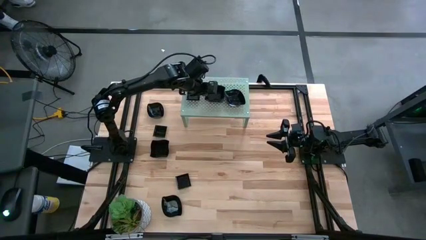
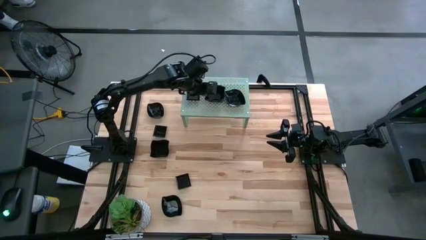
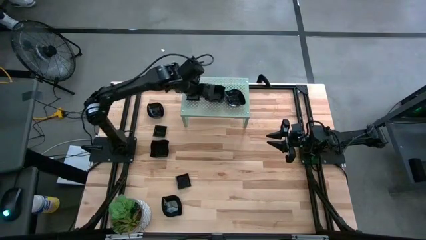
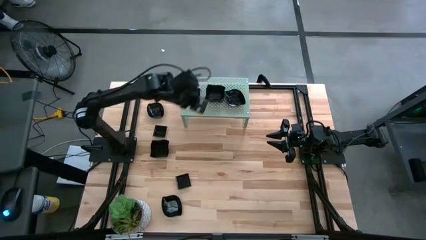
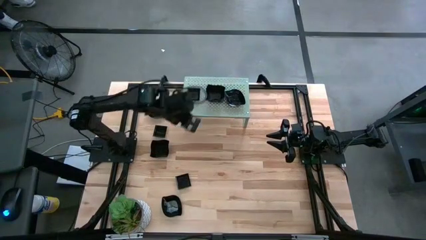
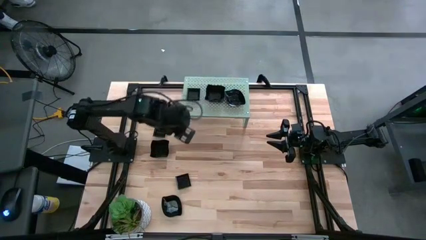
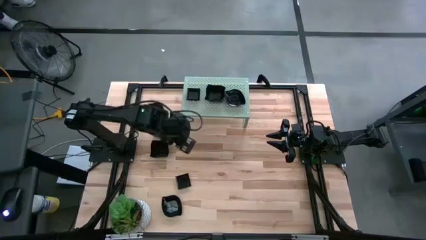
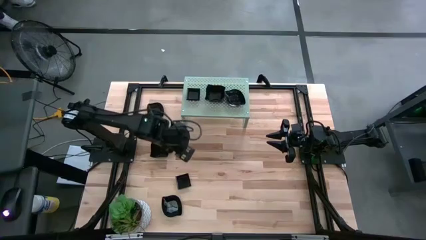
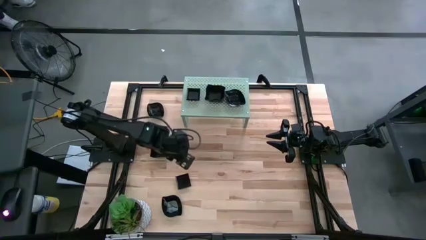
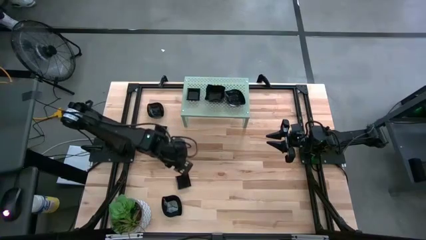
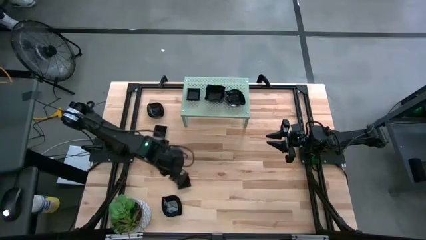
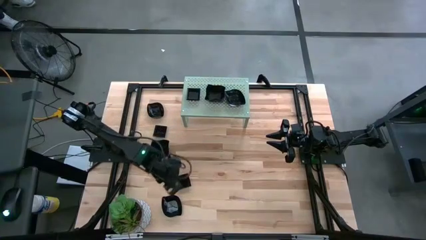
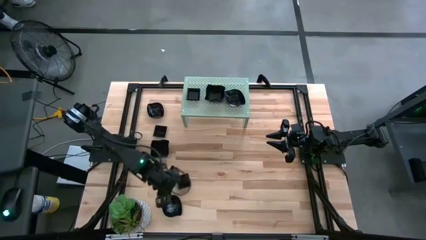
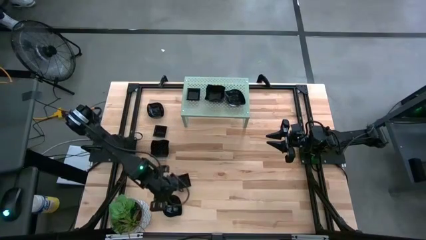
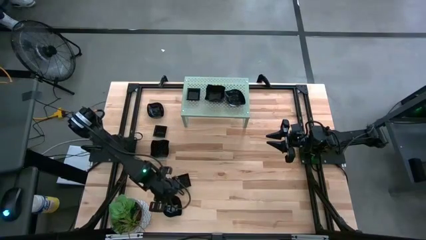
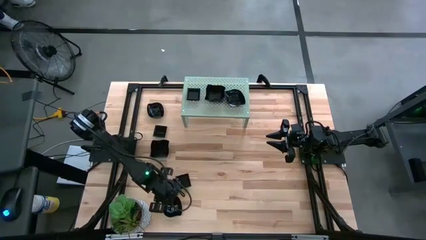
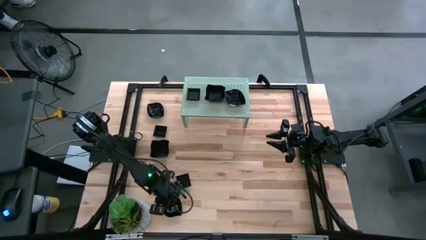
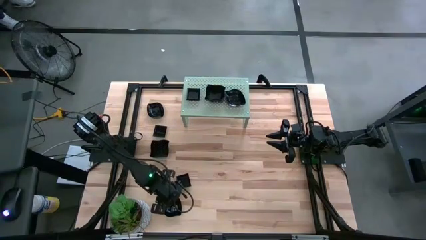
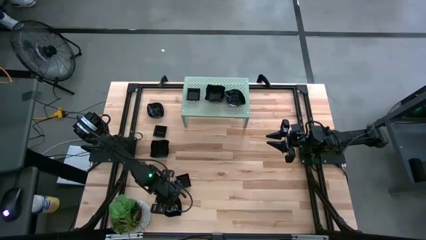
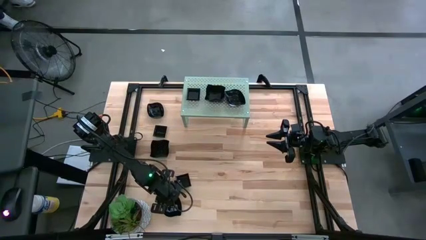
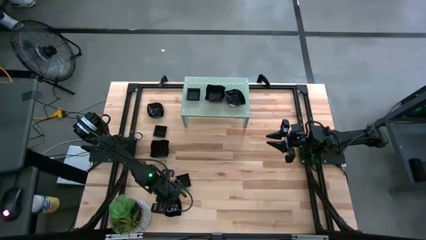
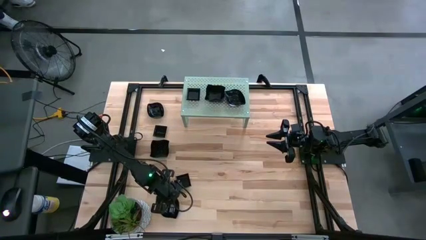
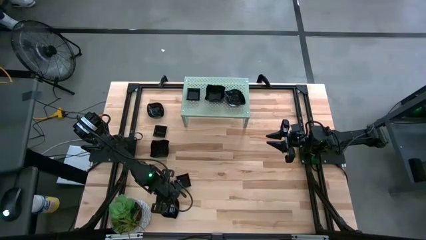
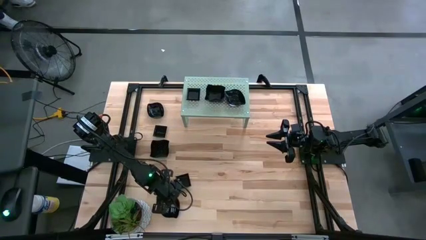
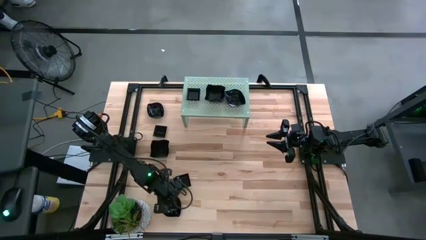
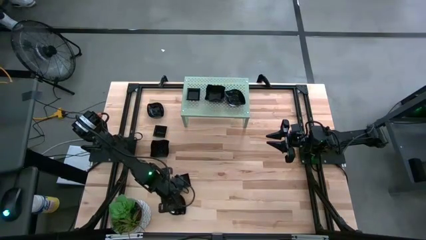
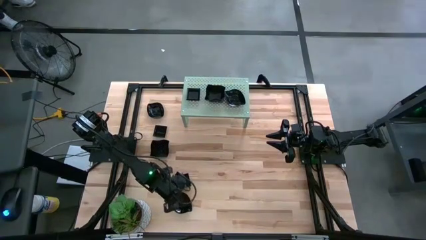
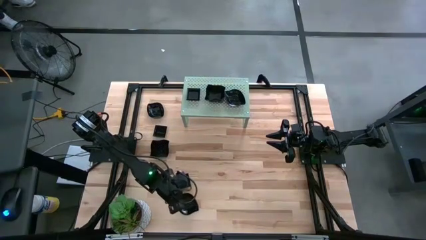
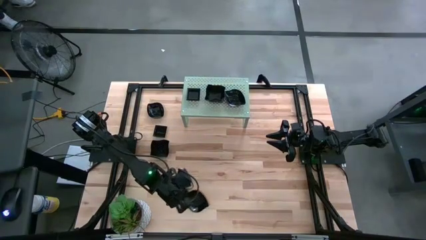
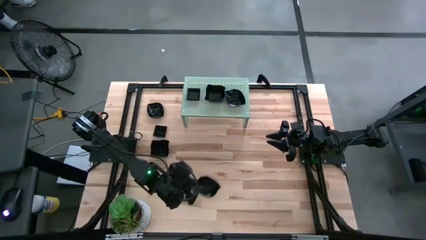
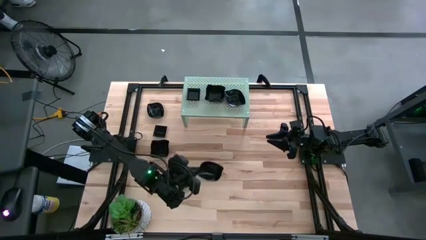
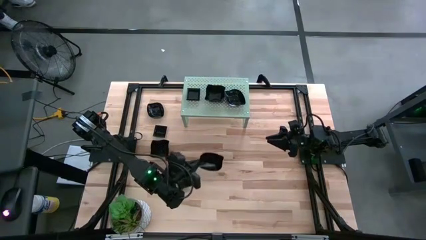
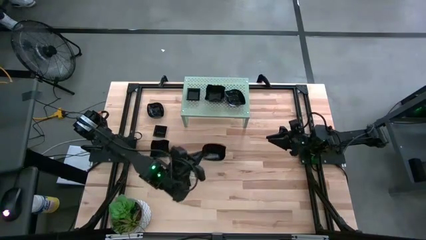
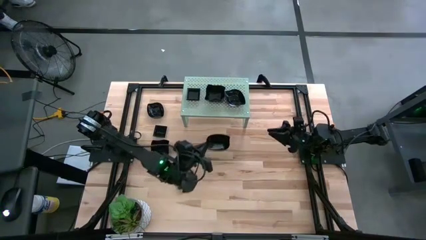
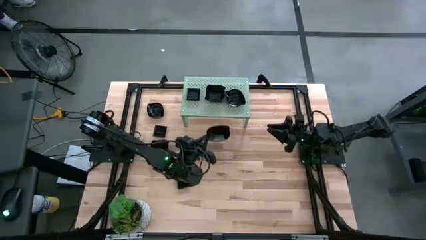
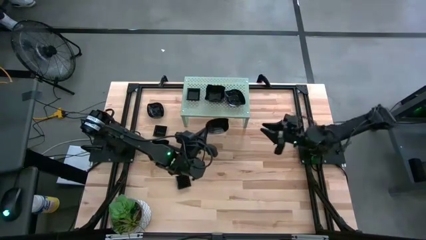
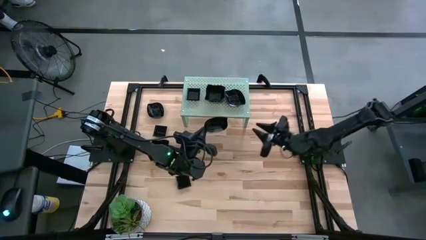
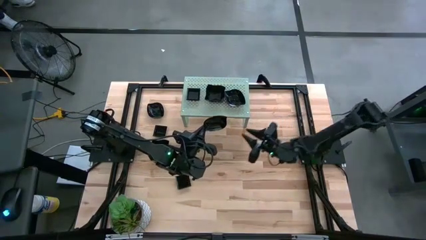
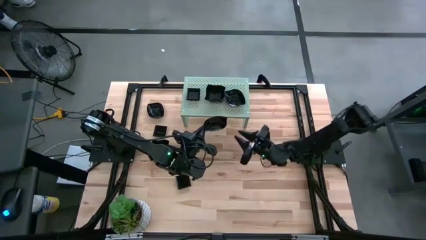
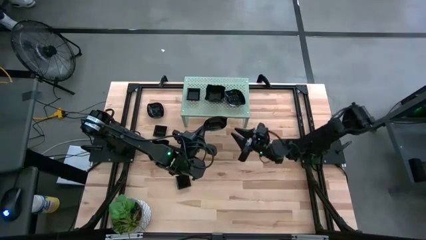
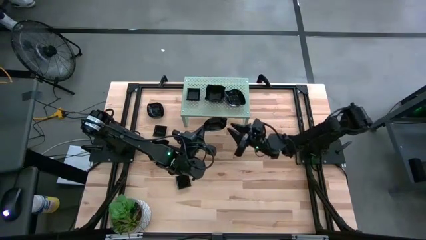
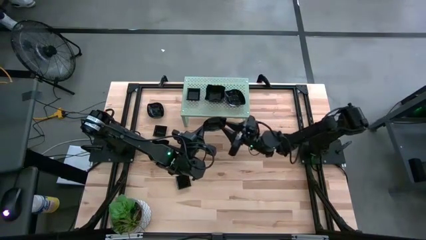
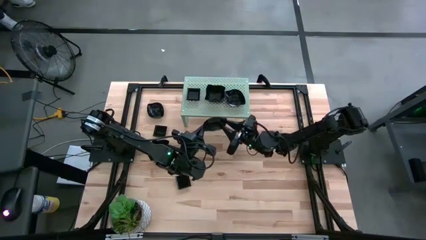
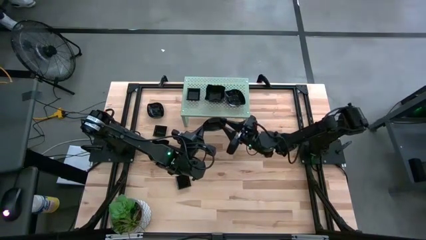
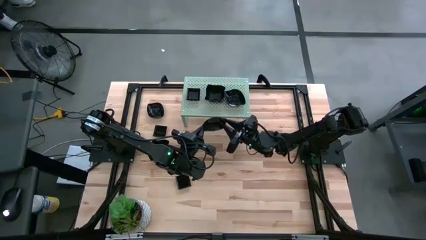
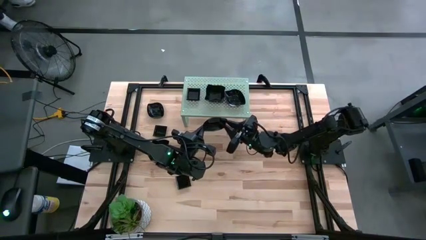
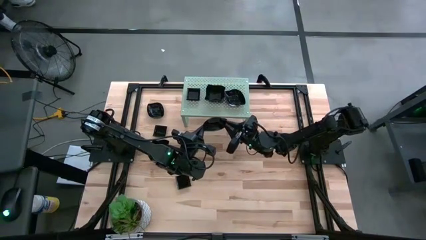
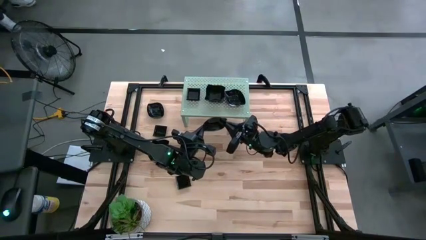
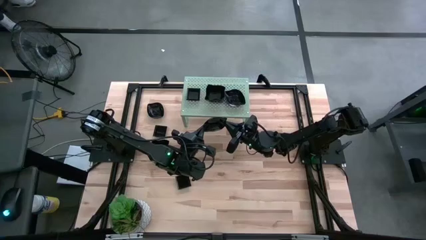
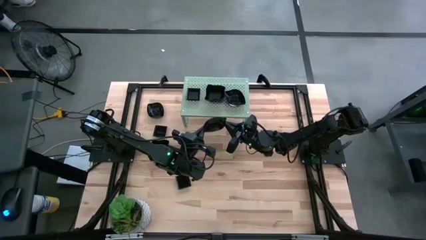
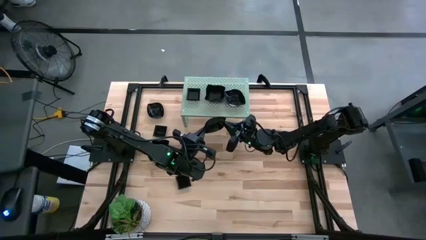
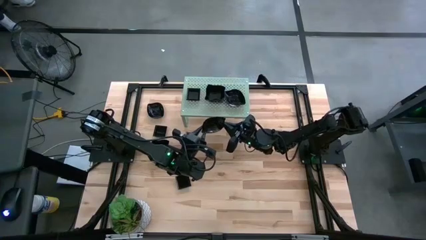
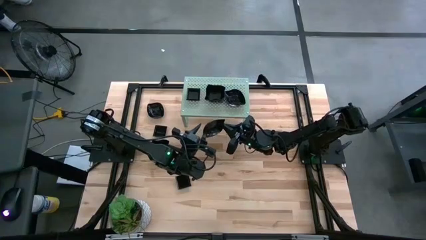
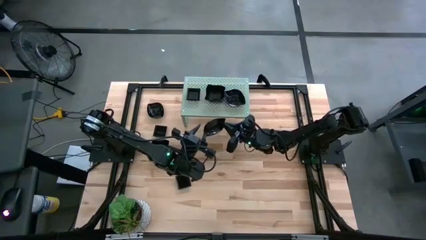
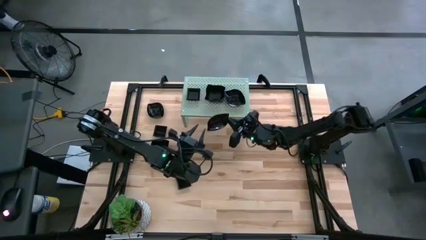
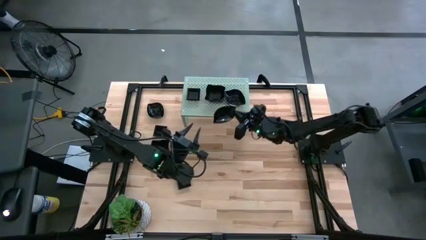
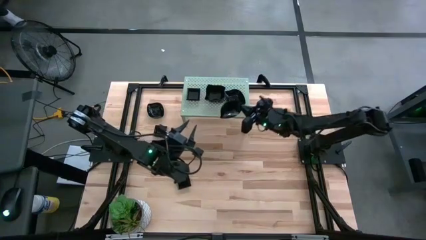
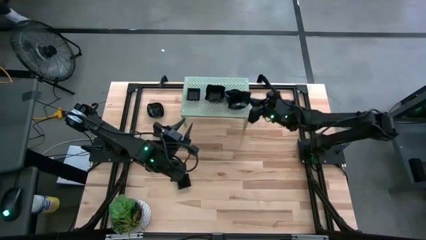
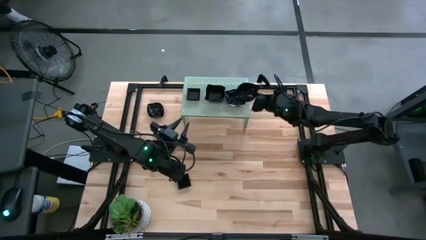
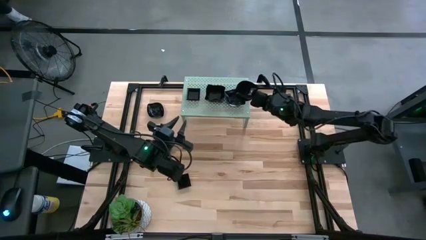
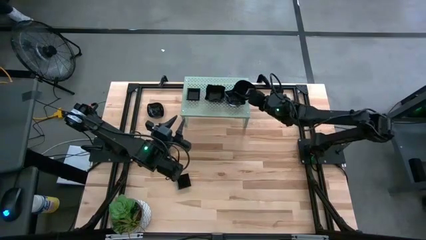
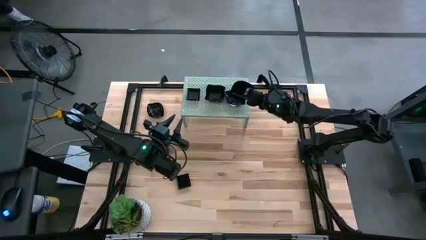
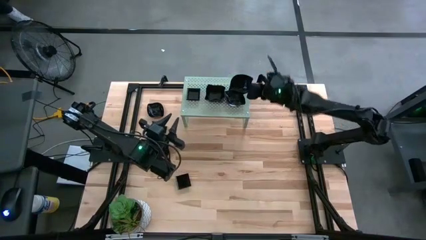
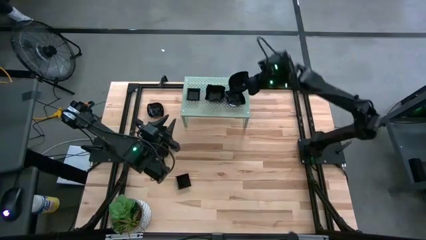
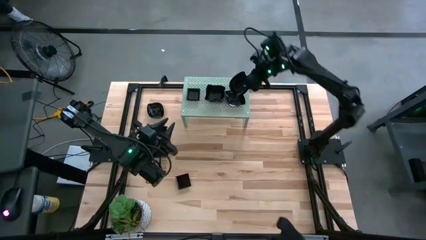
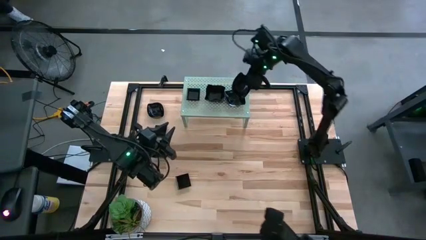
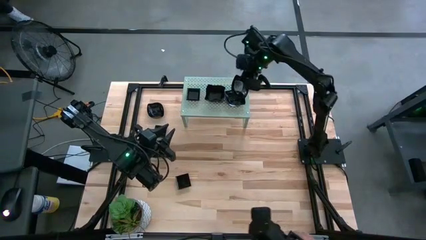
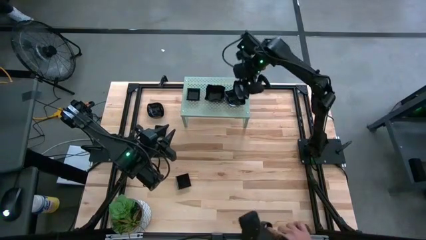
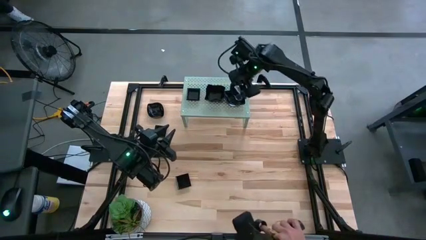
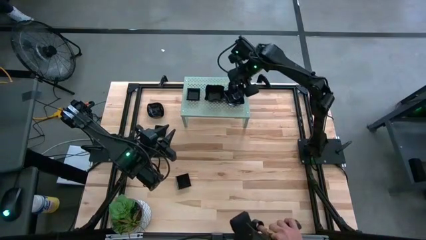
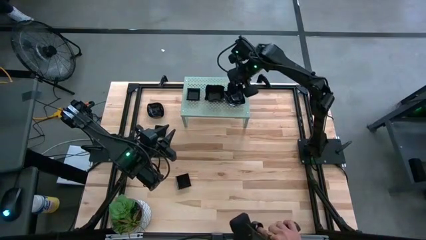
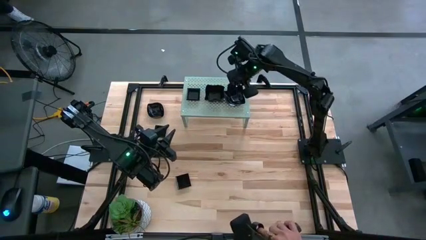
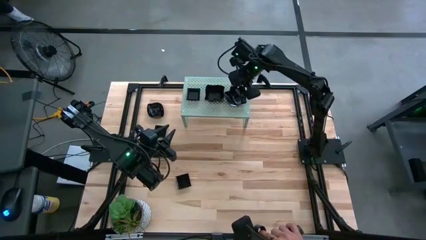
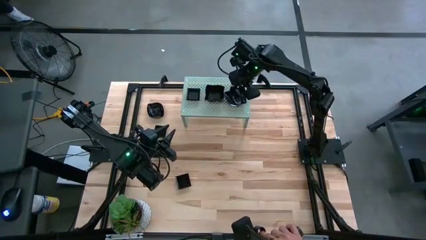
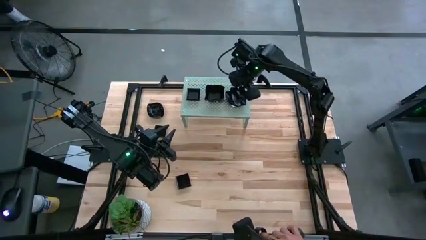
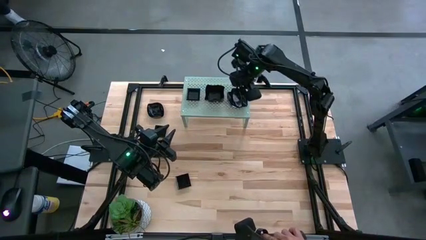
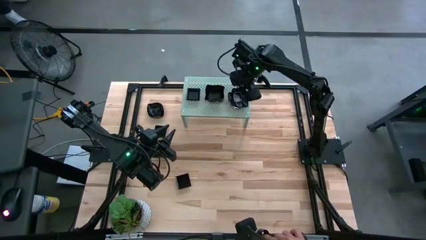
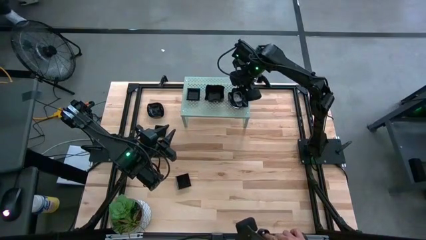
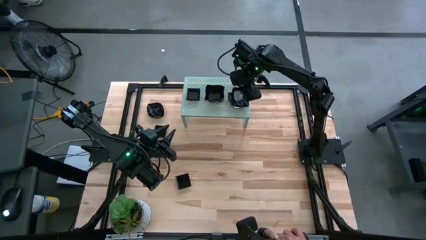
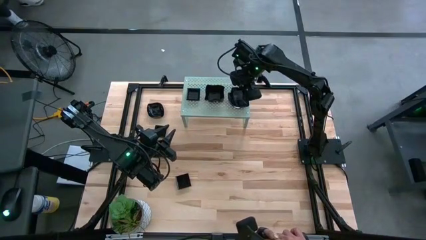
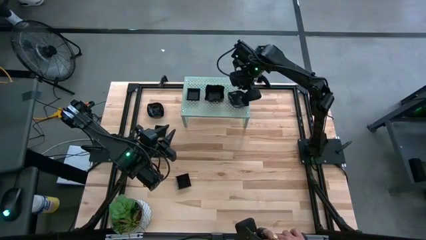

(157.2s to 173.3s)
Task: Pick & Place Mini shaped plates
Stack the leaf shaped plate on top of the leaf shaped plate on the shelf
